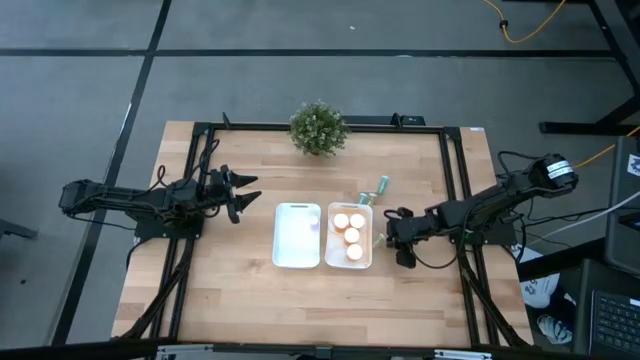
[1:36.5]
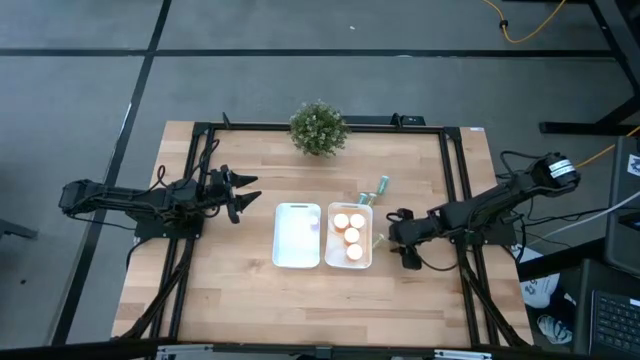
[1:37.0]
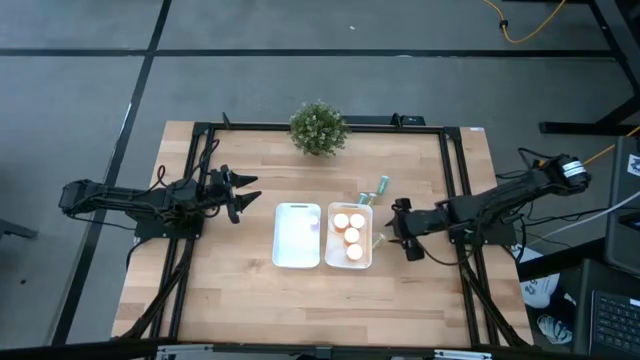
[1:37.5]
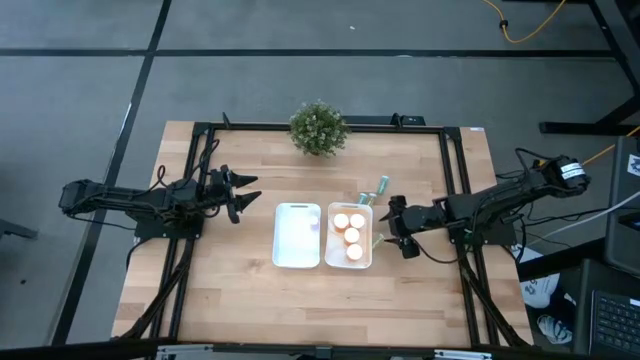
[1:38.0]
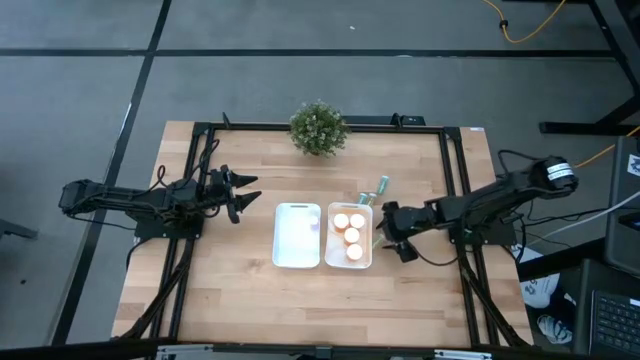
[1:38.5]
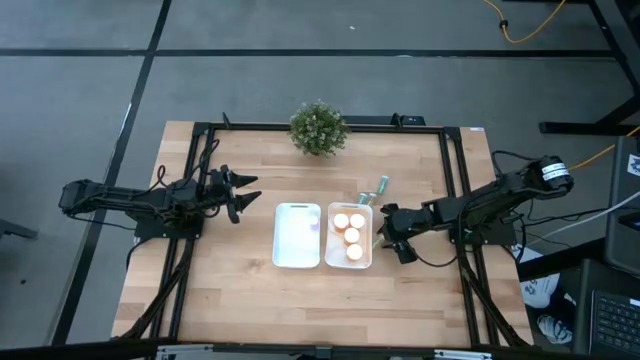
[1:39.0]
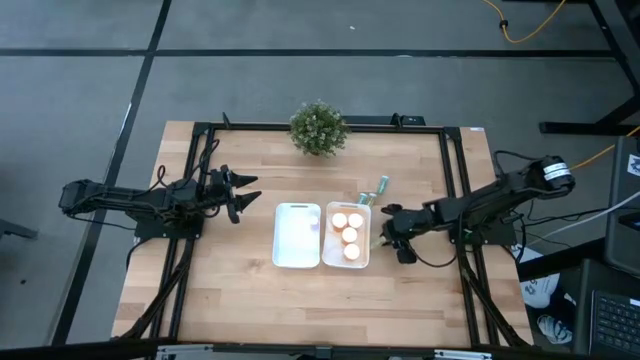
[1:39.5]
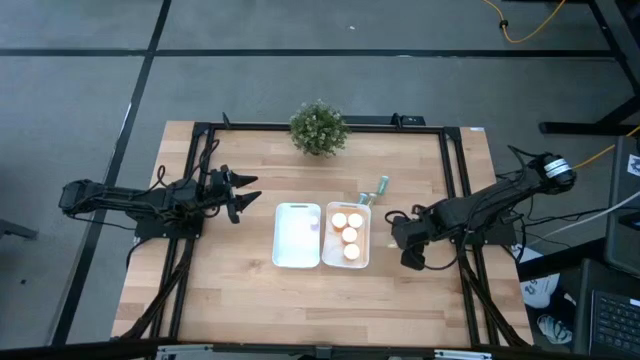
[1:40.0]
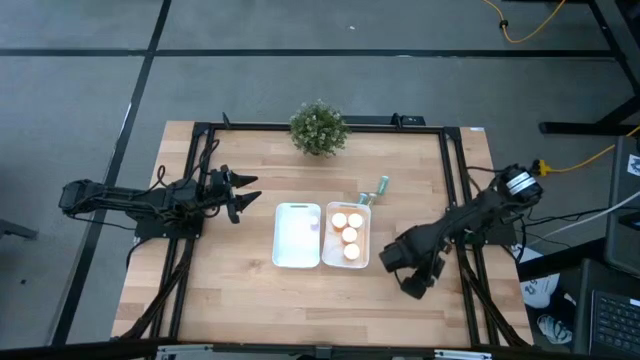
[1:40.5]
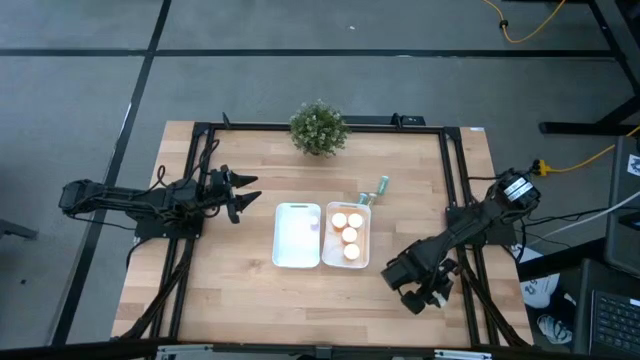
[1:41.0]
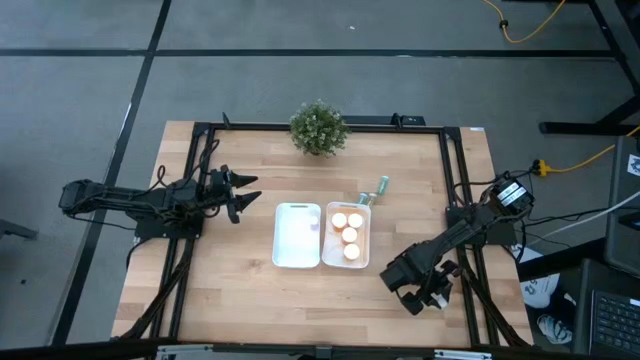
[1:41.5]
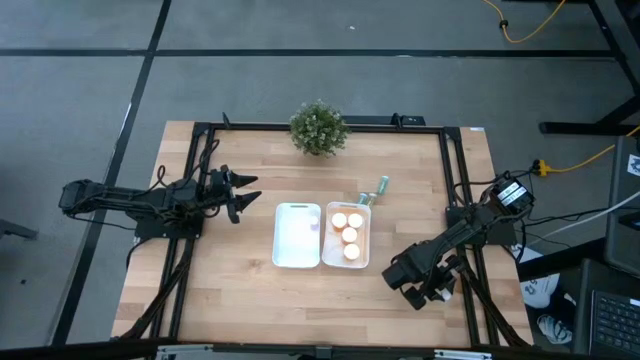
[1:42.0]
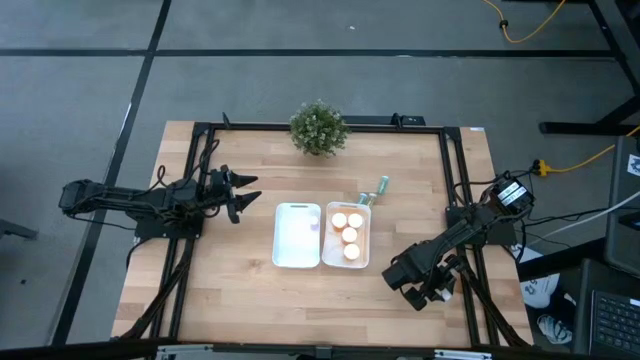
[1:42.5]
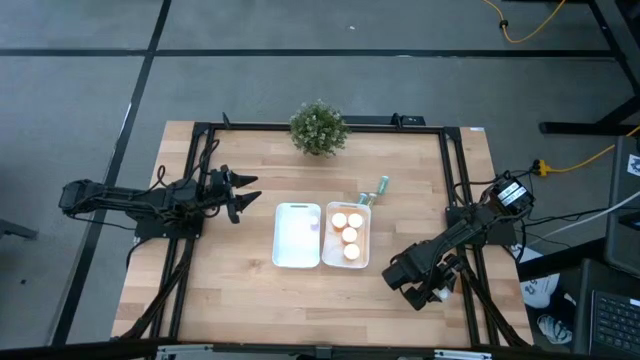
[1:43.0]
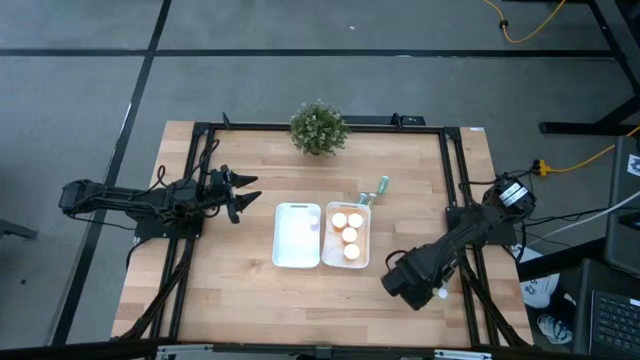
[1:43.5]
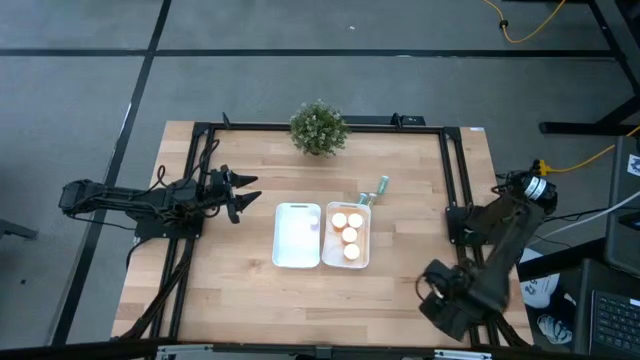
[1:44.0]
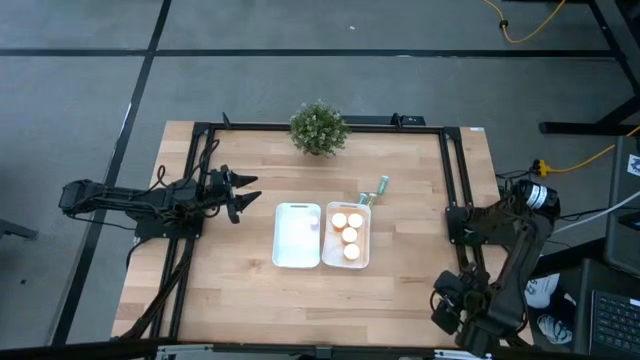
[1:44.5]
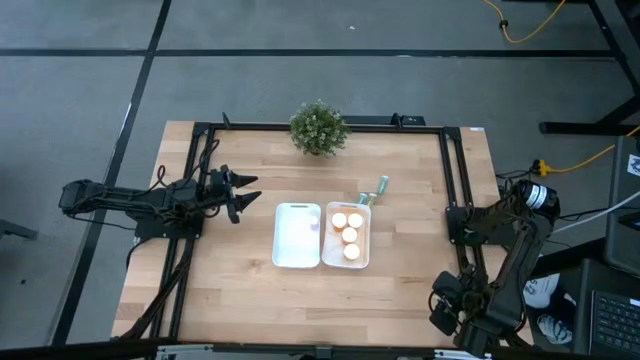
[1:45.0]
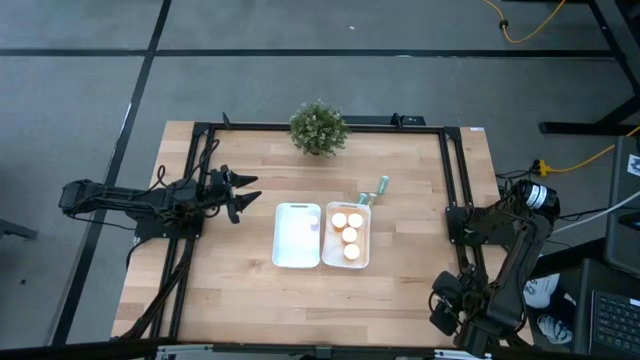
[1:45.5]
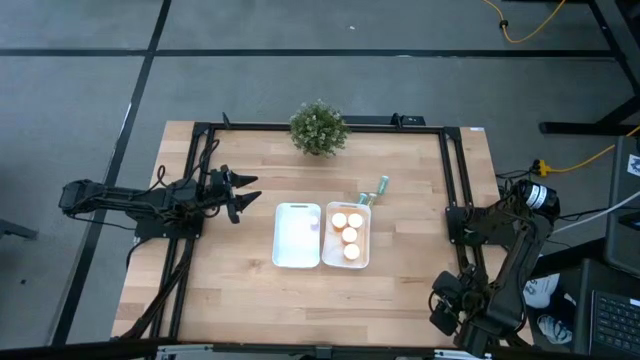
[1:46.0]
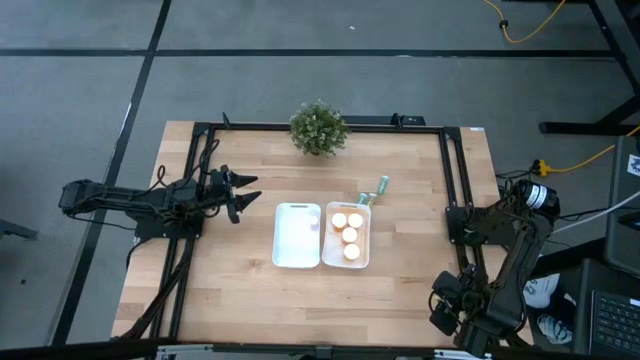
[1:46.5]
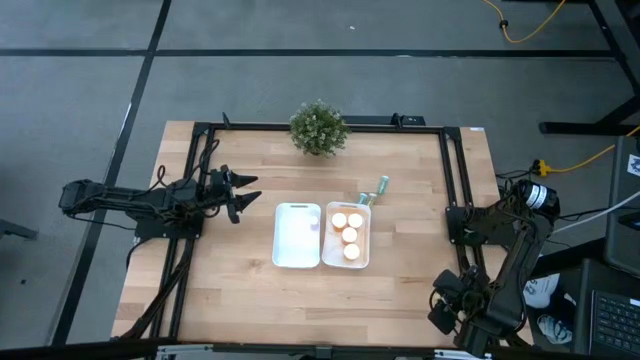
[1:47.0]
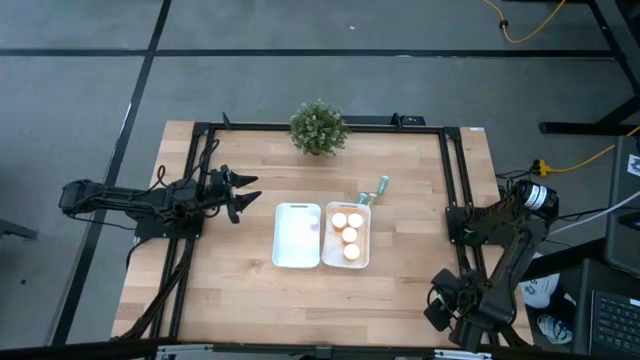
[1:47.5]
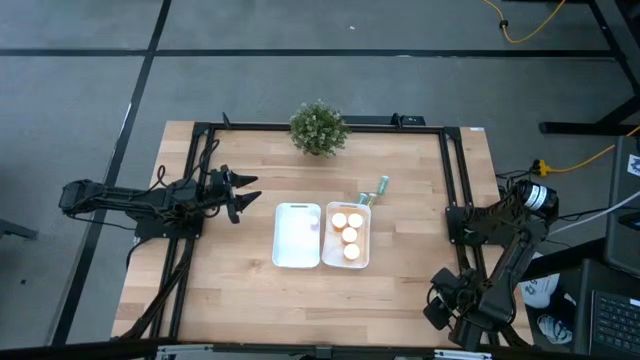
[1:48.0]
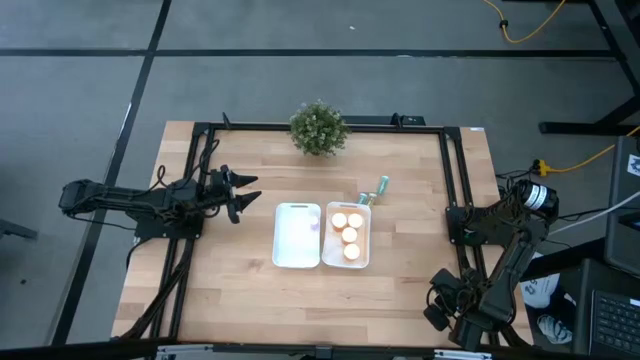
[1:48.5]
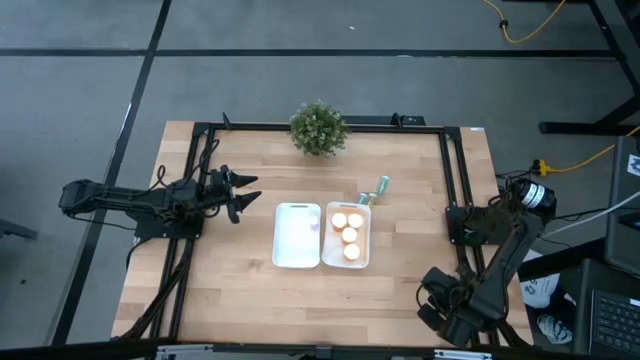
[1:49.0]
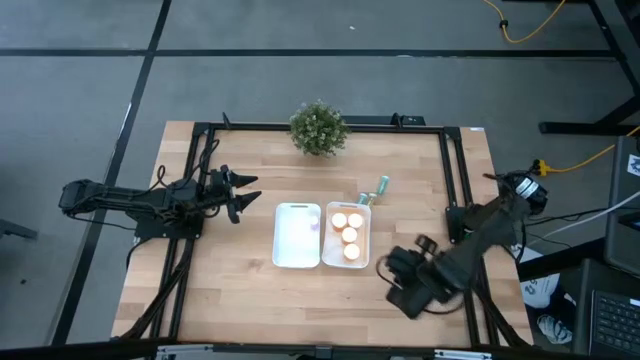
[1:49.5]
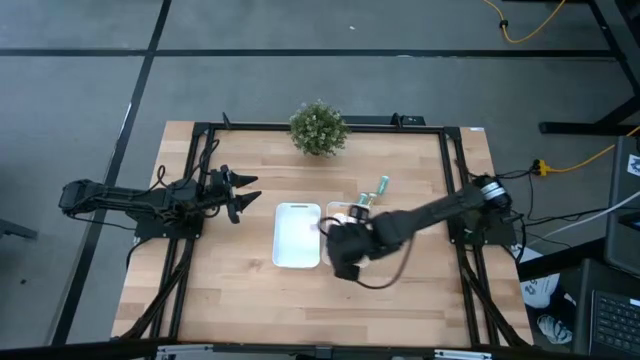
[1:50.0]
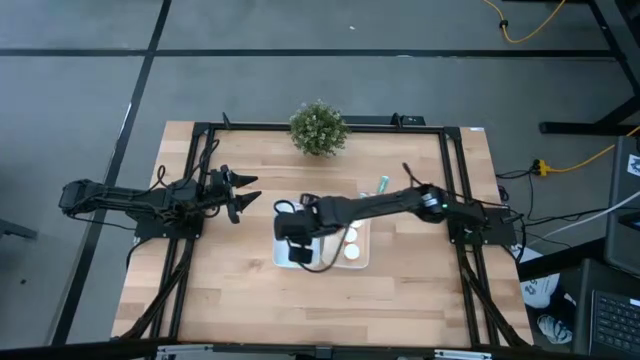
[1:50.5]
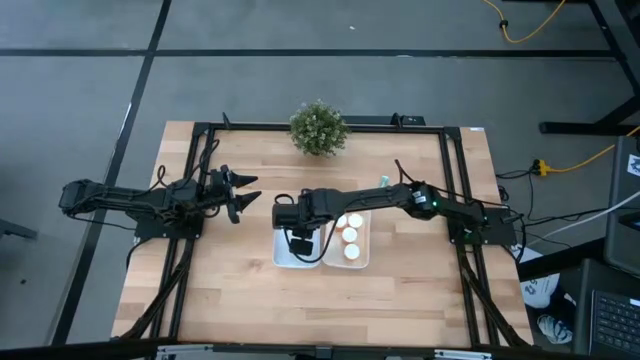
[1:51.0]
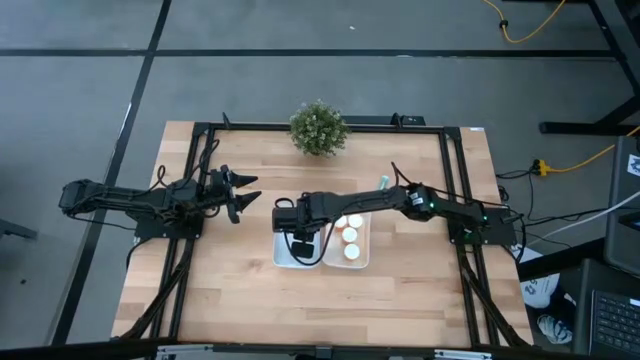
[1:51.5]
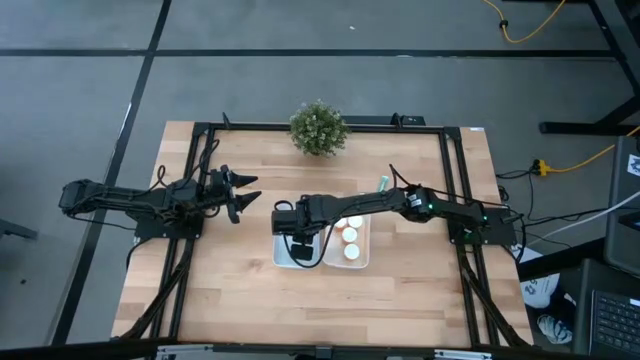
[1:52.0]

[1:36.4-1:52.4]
Task: Pick and place medicine bottles into bin by pill shape (circle, oval)
Put the yellow tablet bottle into the left white bin

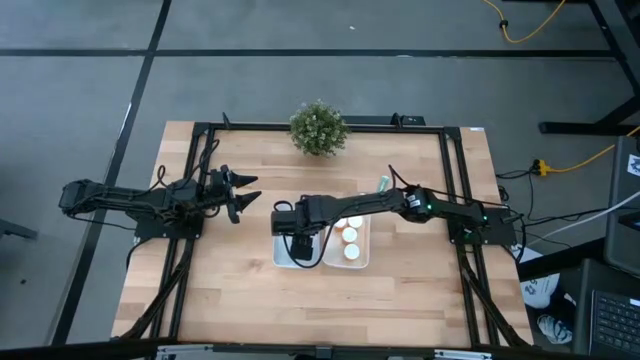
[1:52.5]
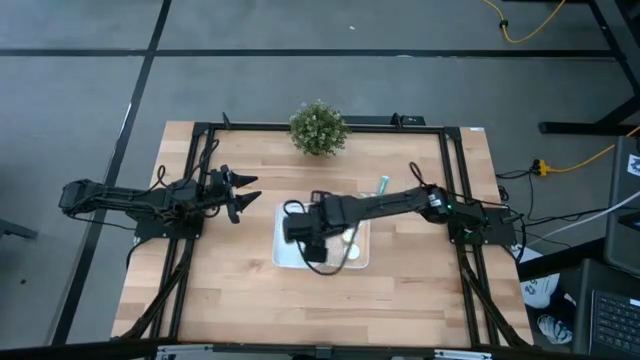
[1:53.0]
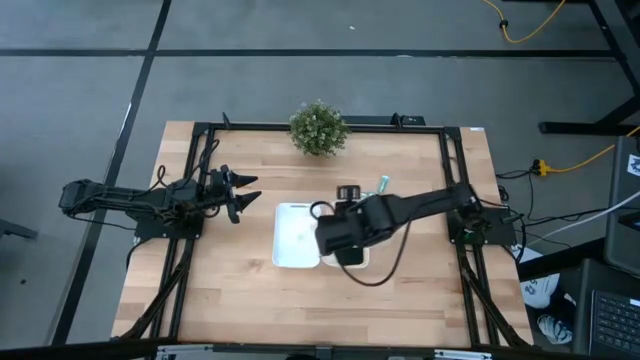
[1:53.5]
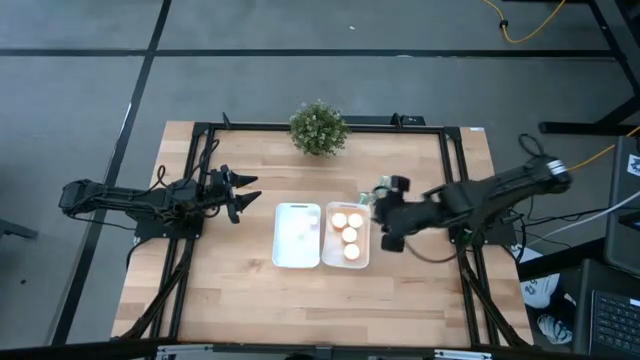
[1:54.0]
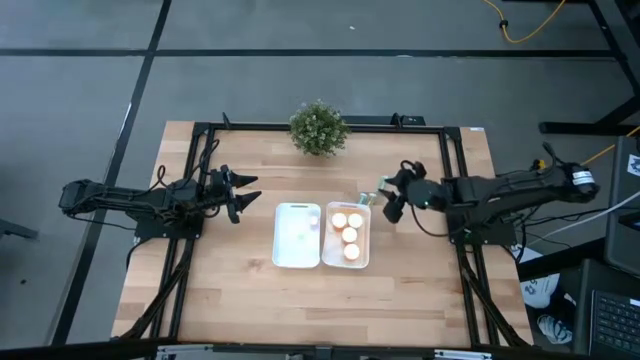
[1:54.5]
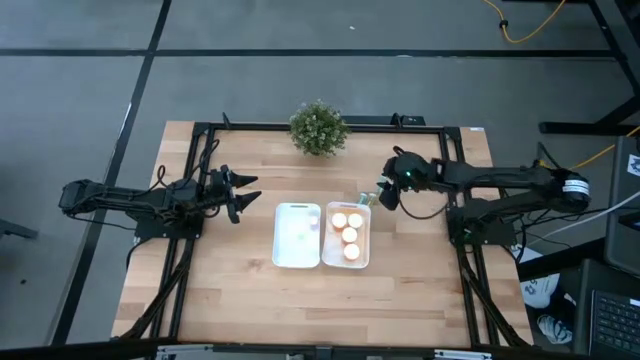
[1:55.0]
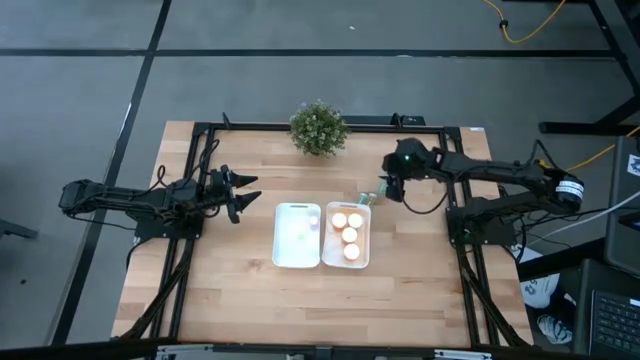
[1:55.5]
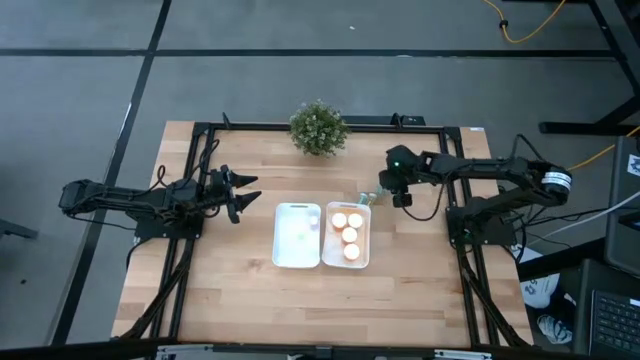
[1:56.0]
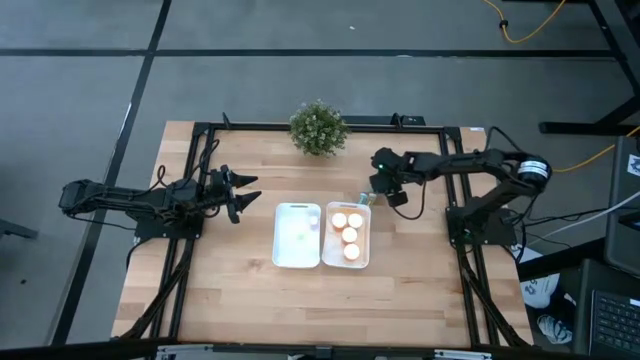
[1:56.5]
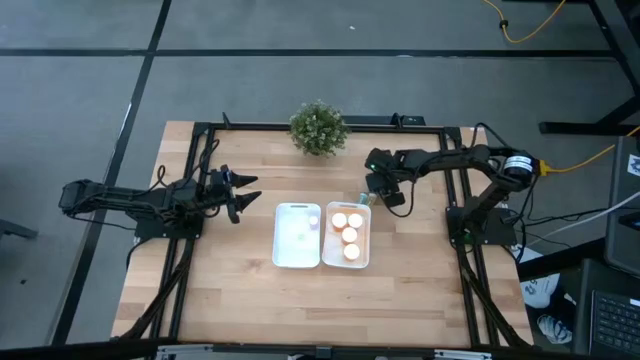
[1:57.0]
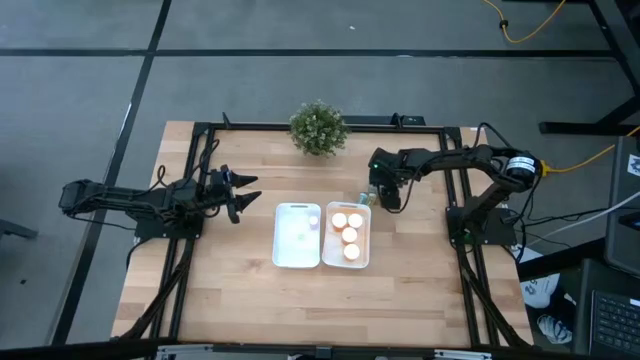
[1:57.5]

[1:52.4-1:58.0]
Put the blue tablet bottle into the left white bin
